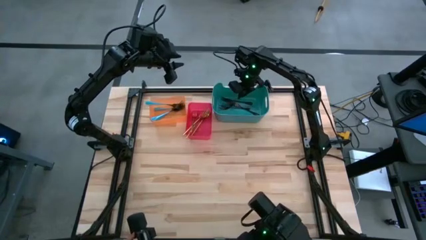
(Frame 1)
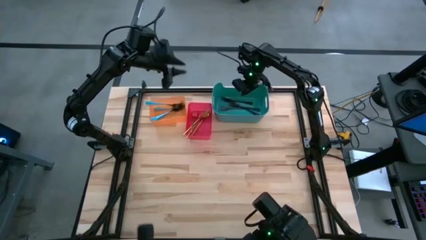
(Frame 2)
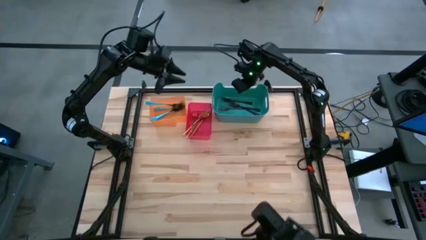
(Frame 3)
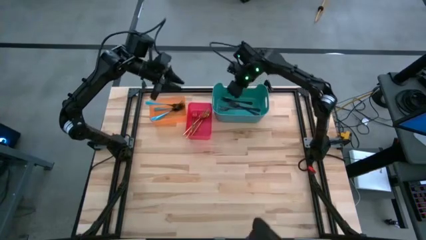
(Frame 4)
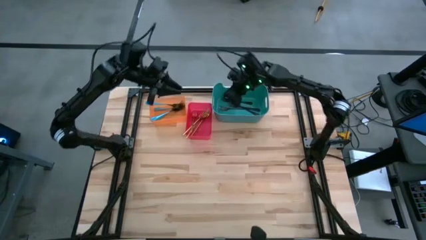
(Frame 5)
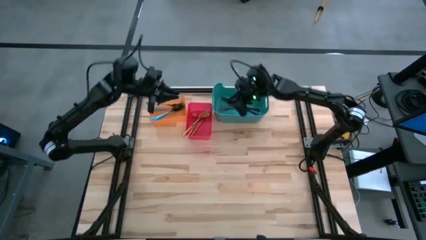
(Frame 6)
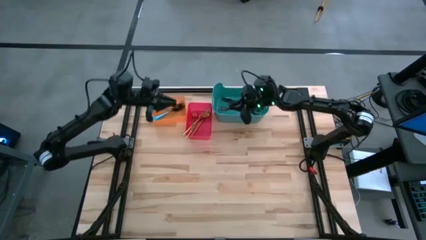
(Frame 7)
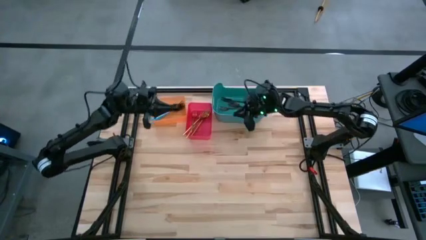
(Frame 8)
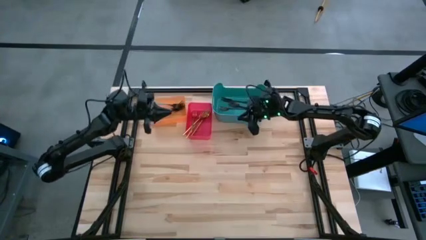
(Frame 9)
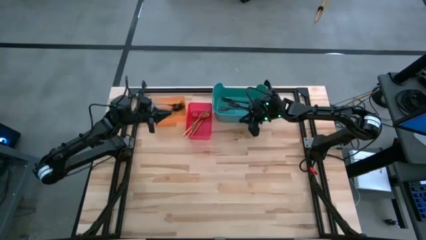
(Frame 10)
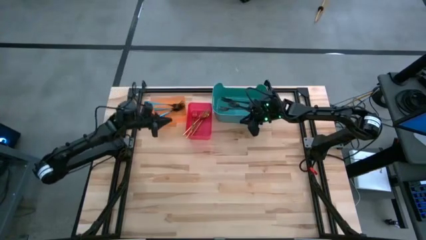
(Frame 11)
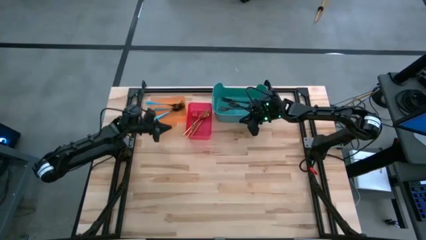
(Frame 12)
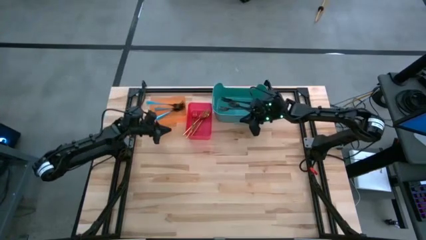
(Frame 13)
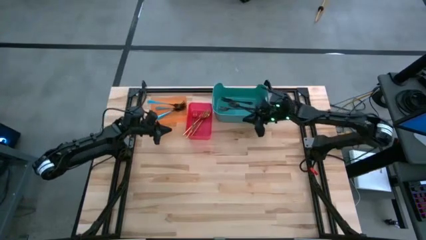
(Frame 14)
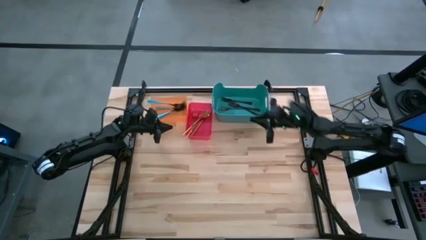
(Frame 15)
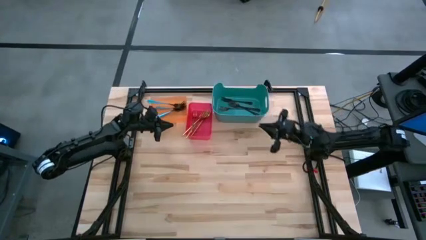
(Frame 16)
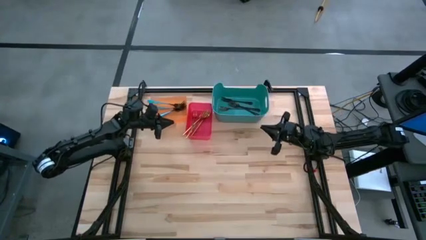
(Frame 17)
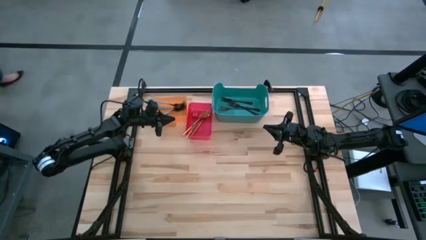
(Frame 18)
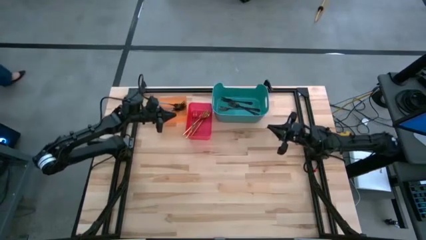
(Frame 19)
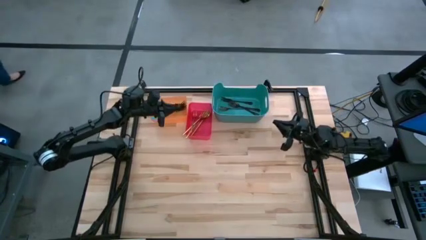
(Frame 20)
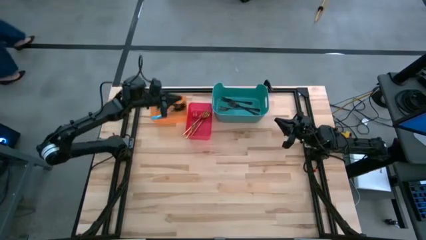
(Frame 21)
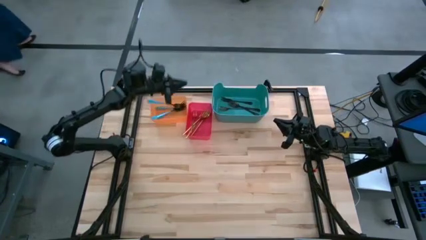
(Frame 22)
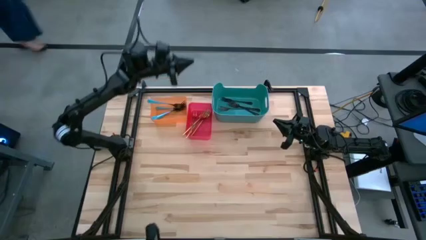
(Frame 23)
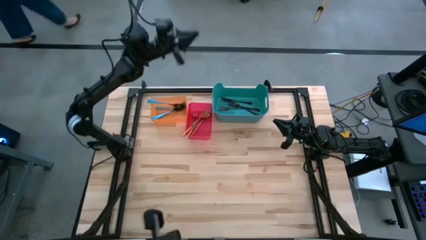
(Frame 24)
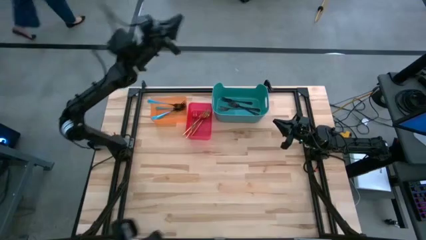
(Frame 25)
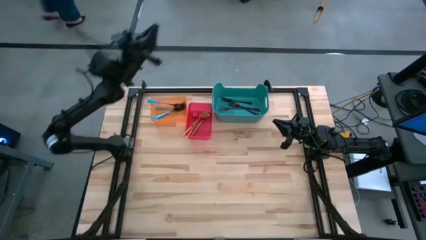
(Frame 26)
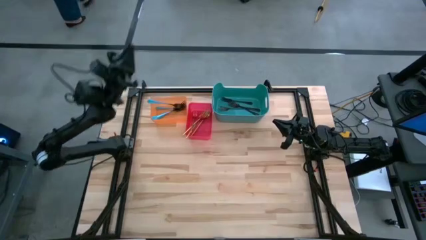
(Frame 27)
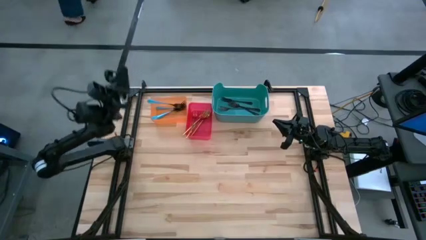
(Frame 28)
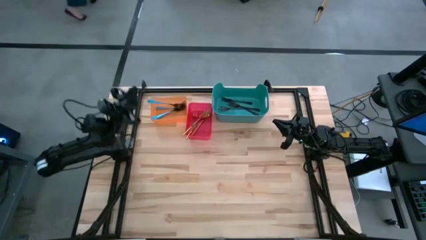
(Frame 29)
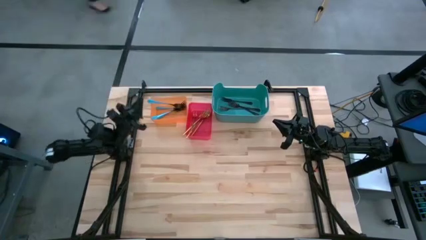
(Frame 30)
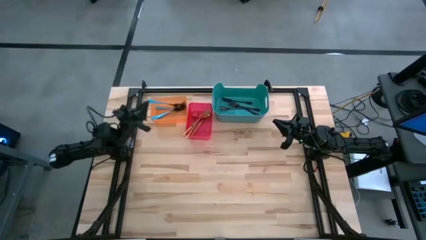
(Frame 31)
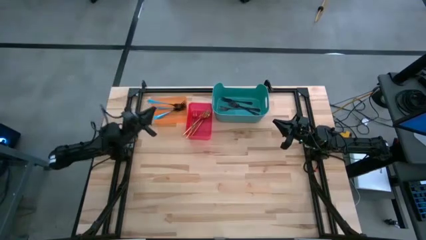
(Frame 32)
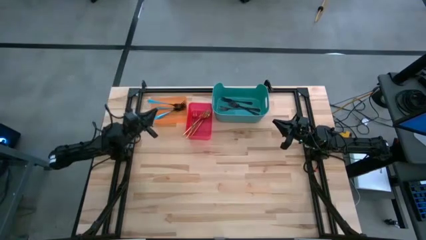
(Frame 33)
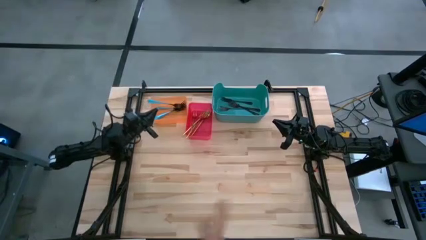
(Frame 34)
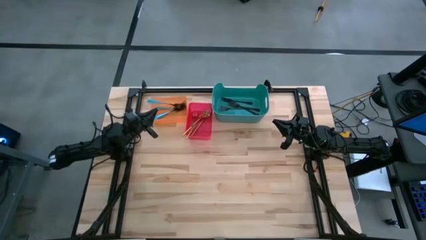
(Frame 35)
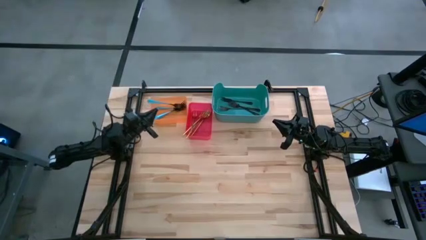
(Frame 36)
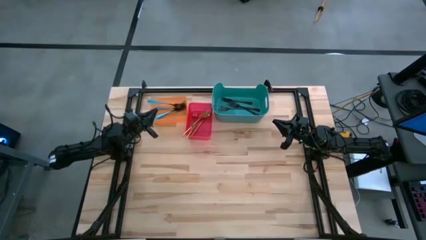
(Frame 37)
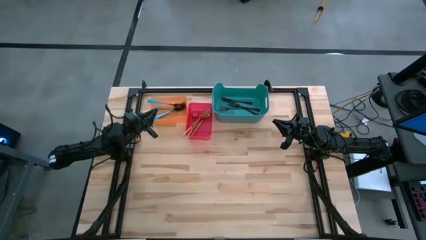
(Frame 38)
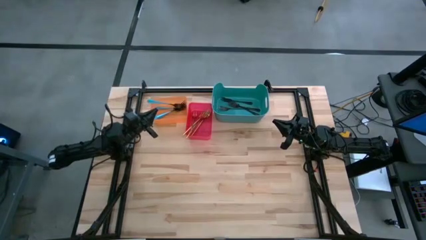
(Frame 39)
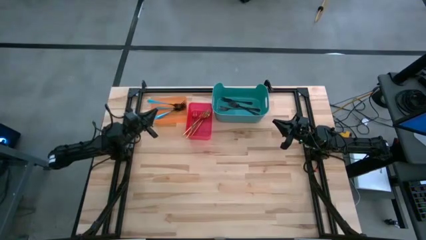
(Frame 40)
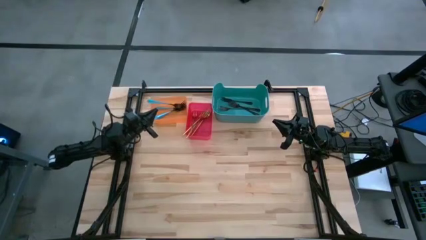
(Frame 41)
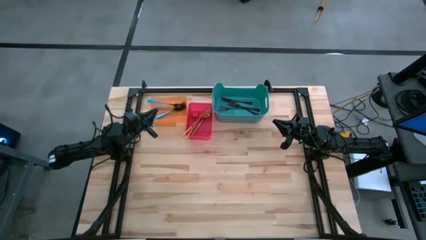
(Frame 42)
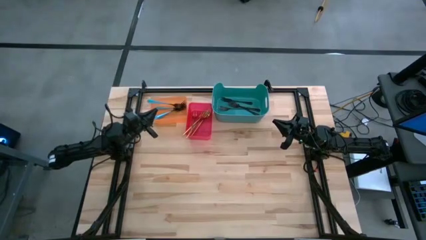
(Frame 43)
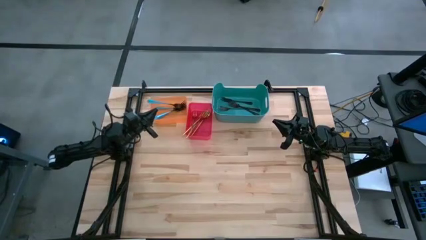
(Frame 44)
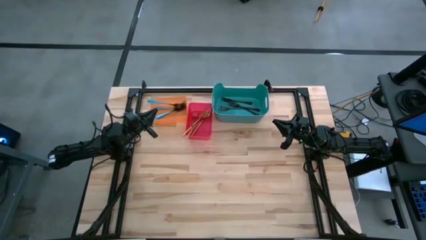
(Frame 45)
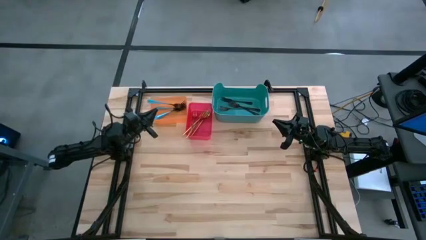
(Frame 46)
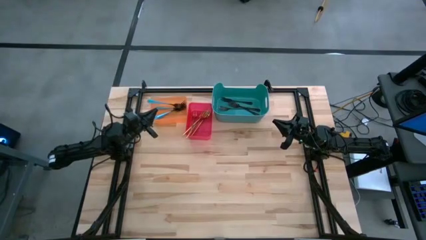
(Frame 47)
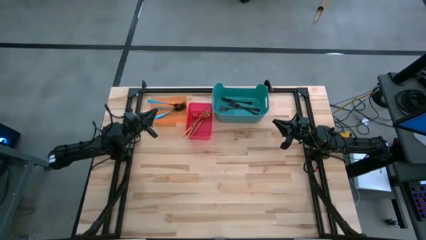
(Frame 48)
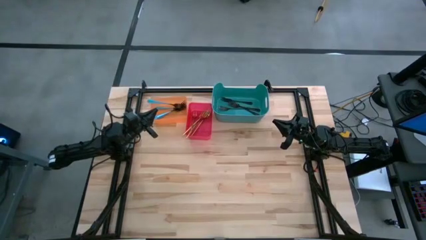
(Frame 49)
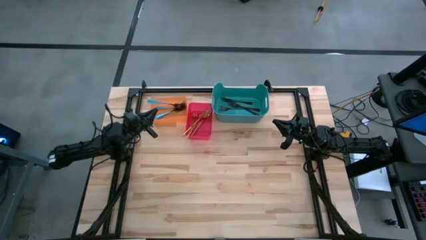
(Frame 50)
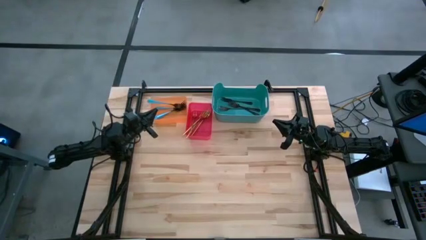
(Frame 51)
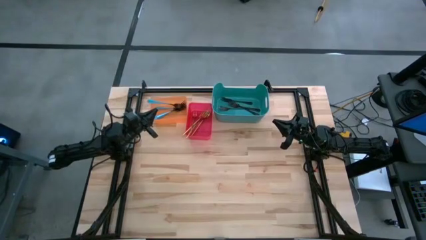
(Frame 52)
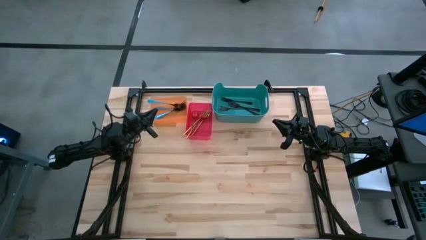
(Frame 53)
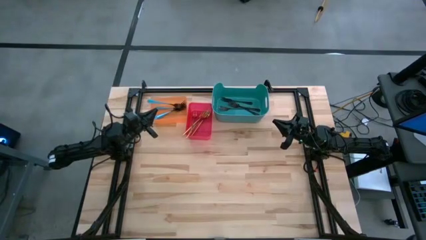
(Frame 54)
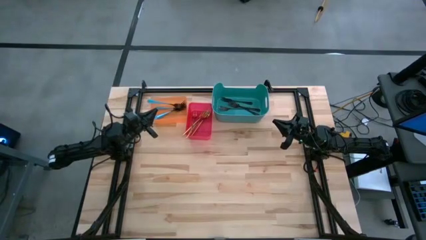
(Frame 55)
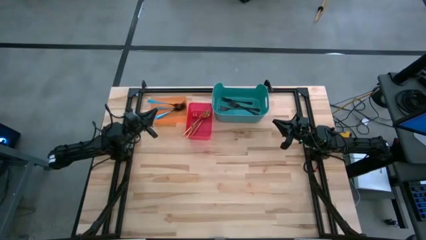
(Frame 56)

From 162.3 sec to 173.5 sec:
Task: Sort silverware by color (type)
Return to Home Position

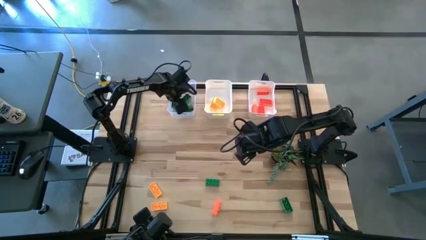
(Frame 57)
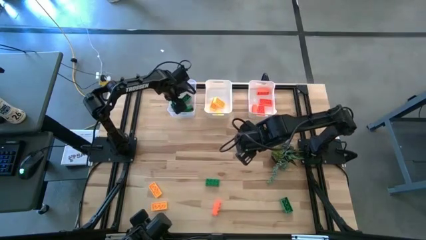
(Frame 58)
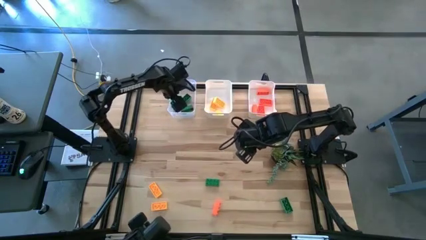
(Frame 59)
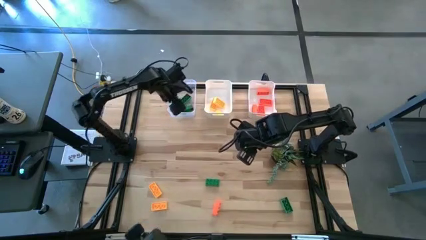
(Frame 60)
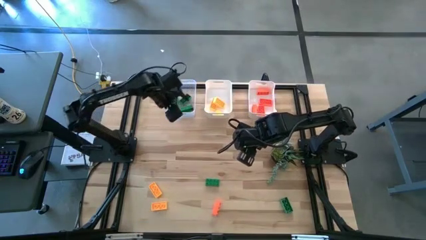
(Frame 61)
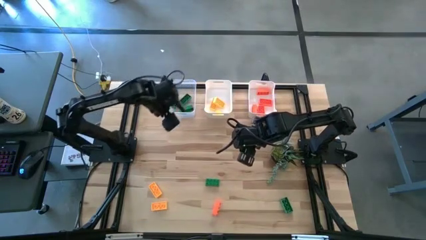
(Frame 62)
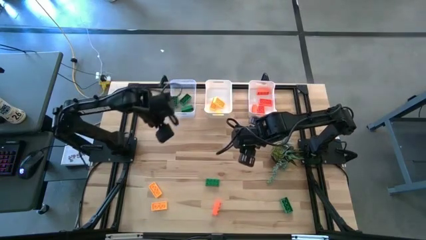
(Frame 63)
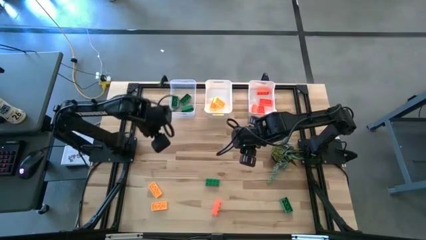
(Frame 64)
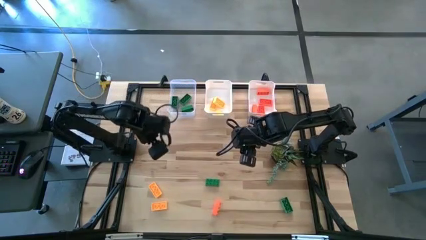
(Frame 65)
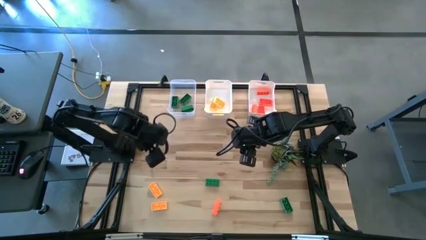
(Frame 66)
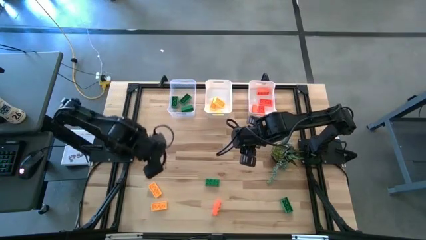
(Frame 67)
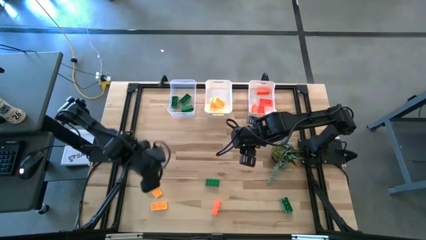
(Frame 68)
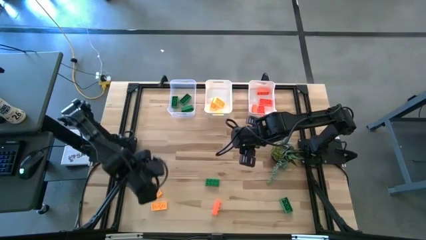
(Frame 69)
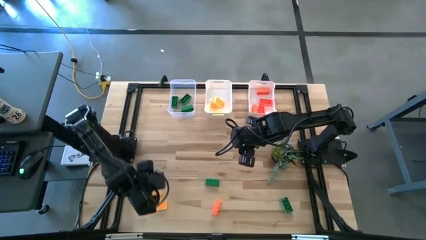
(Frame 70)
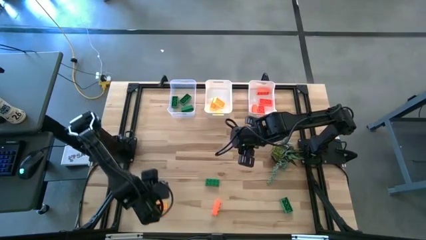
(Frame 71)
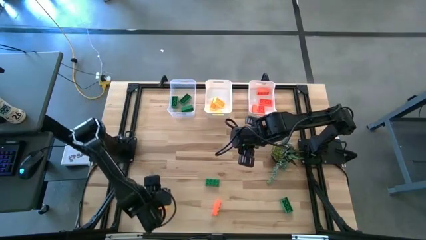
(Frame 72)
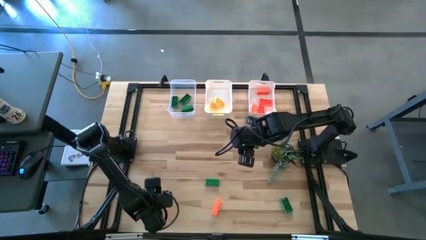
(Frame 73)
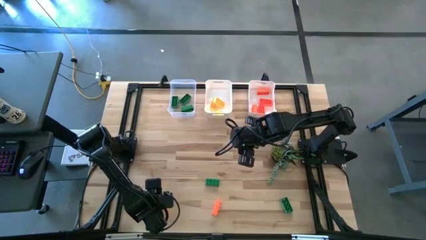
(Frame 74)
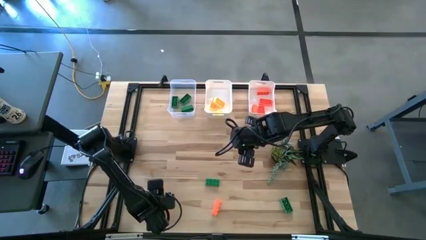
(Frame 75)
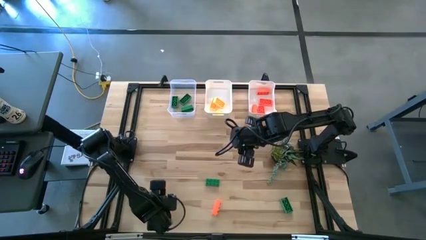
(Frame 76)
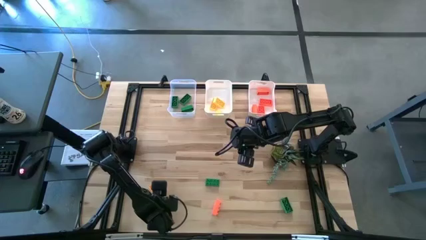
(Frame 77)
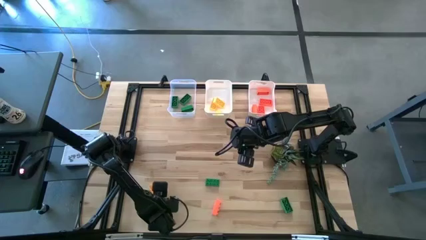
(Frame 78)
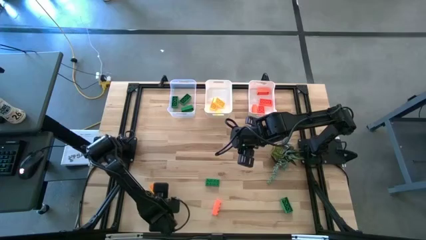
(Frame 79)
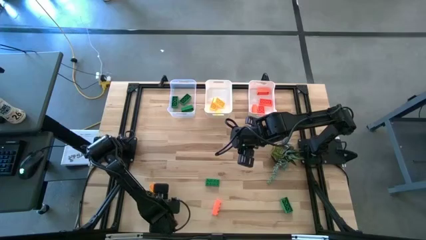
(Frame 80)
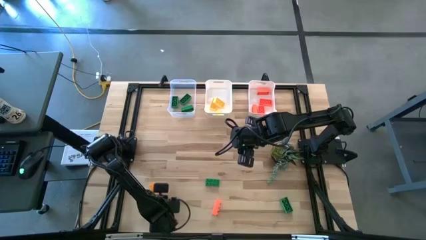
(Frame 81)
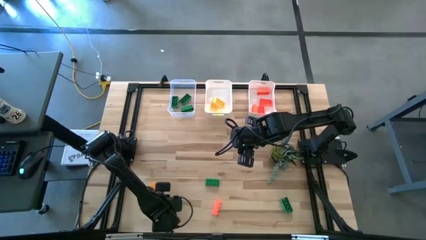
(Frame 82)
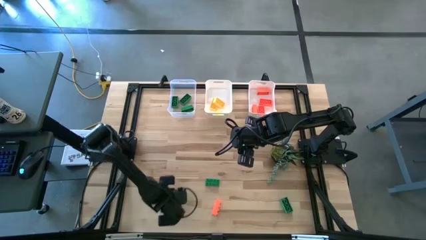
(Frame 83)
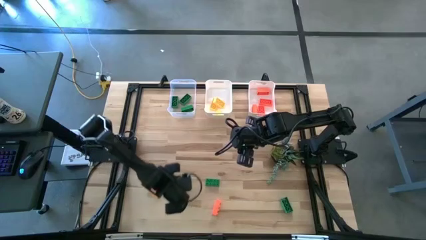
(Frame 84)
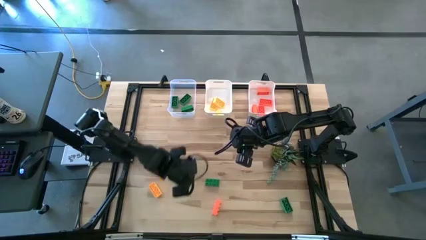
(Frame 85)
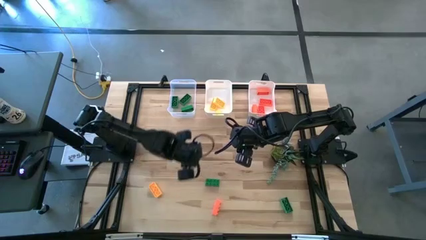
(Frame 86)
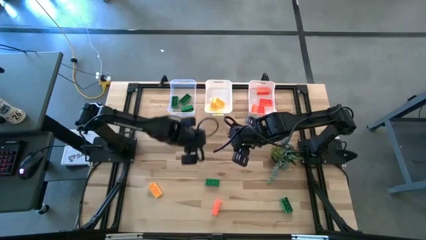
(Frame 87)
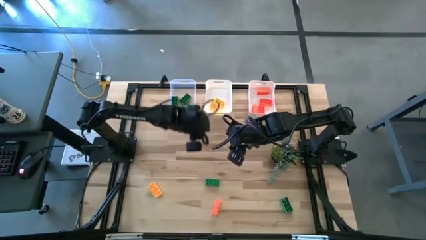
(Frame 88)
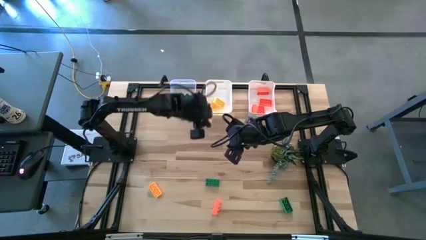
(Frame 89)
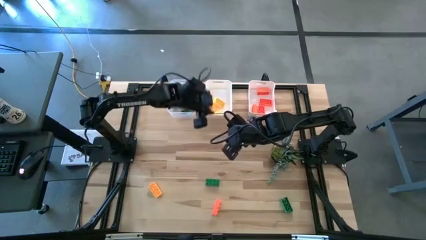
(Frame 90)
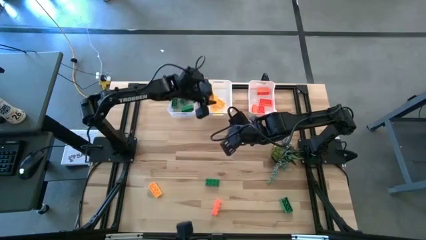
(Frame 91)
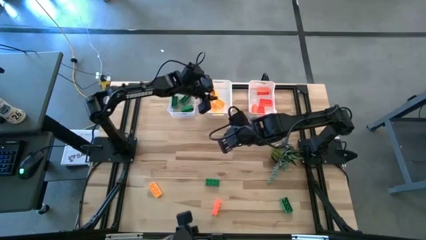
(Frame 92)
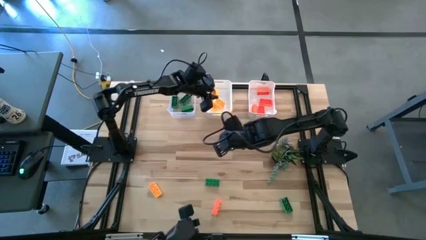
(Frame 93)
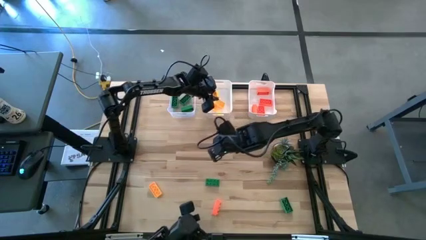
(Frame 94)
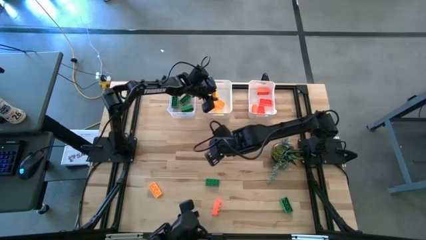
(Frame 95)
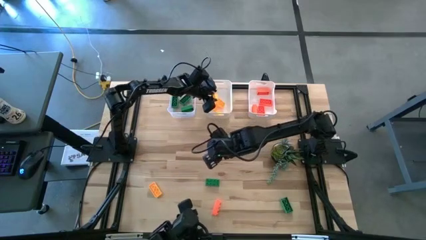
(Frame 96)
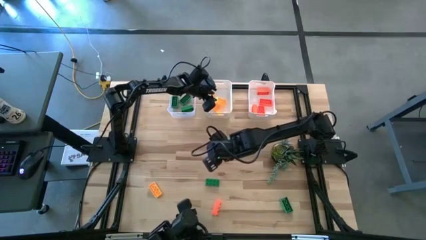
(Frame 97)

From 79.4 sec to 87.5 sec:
Task: Sort & place blocks by color
Put the yellow game piece into the left white bin
